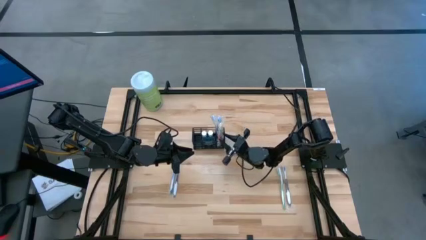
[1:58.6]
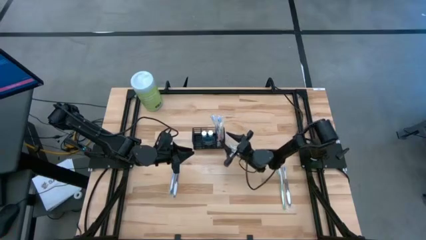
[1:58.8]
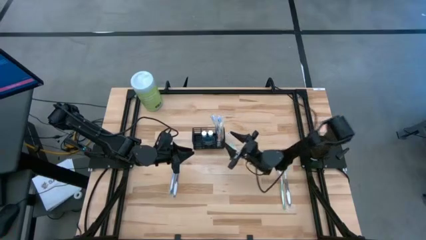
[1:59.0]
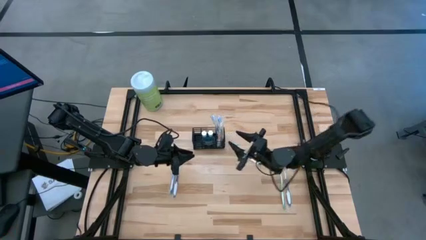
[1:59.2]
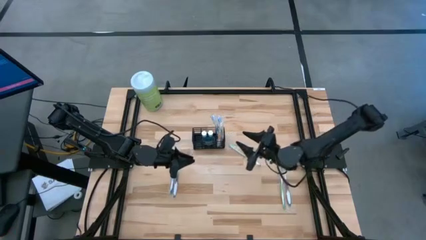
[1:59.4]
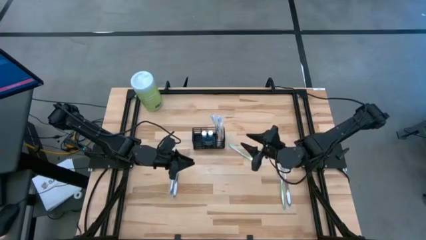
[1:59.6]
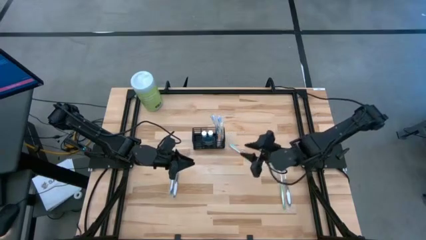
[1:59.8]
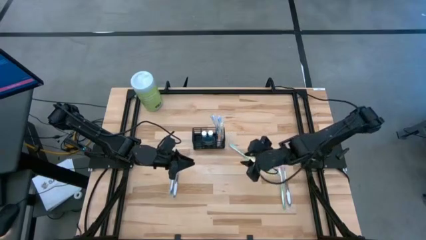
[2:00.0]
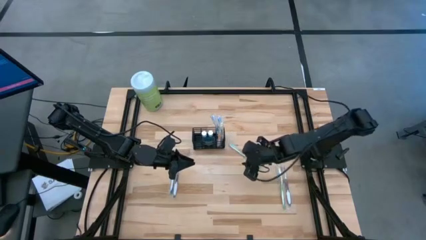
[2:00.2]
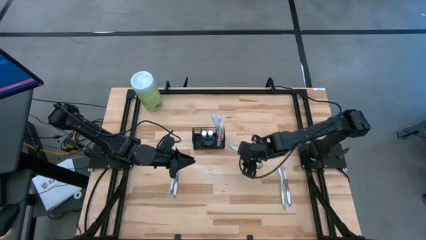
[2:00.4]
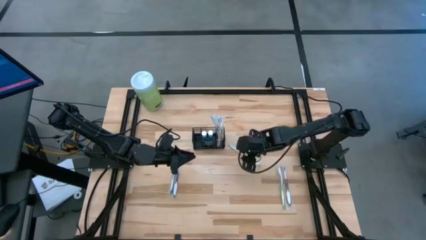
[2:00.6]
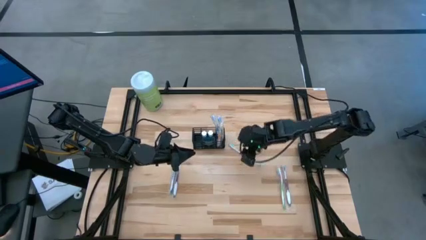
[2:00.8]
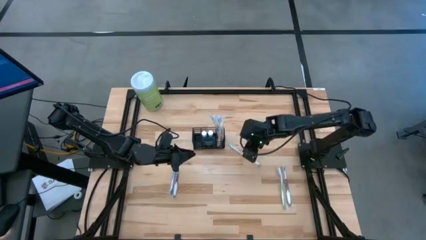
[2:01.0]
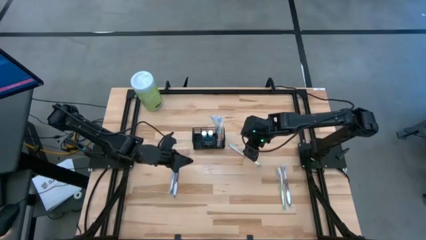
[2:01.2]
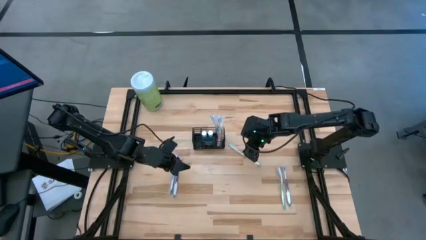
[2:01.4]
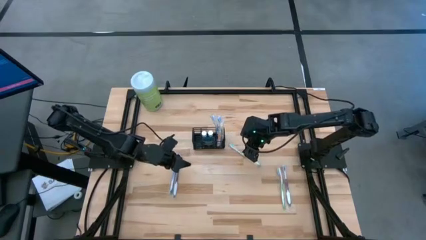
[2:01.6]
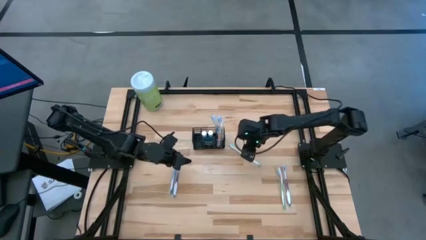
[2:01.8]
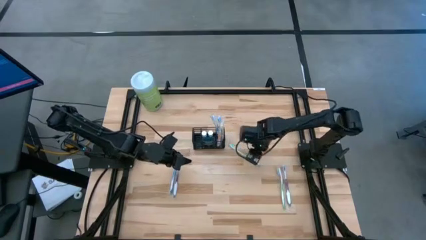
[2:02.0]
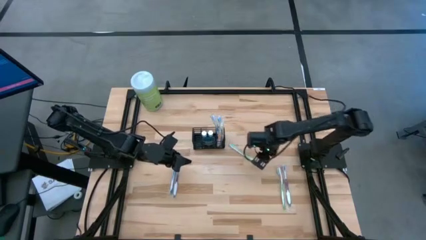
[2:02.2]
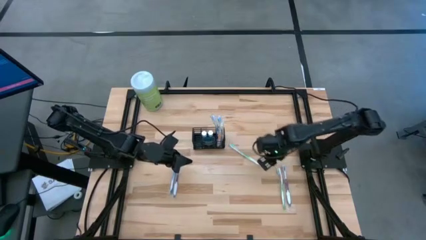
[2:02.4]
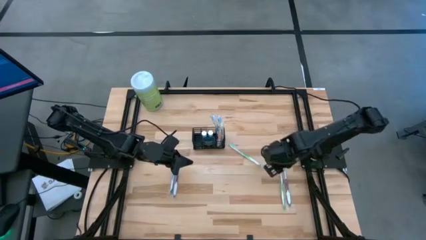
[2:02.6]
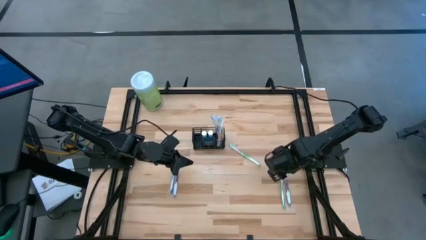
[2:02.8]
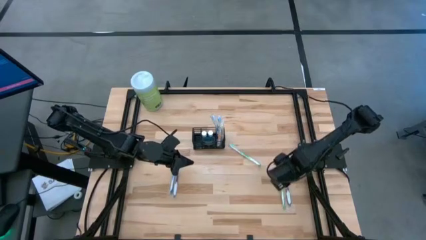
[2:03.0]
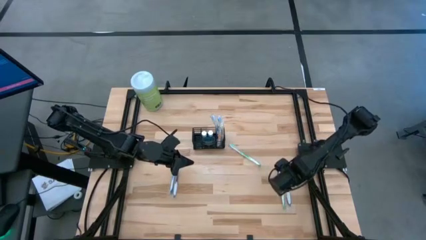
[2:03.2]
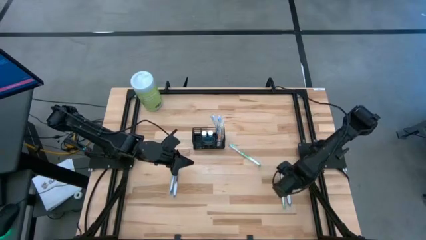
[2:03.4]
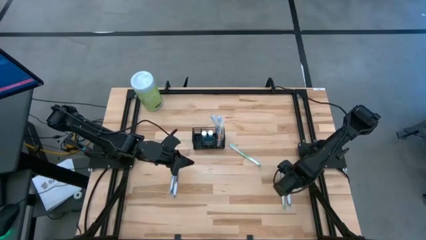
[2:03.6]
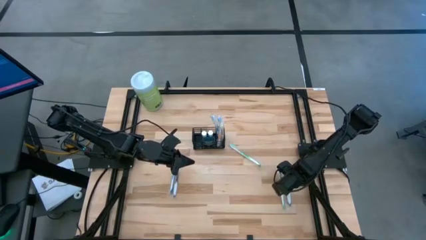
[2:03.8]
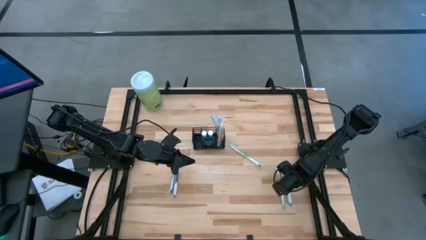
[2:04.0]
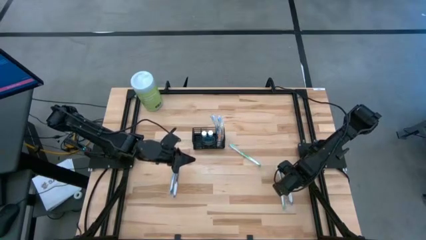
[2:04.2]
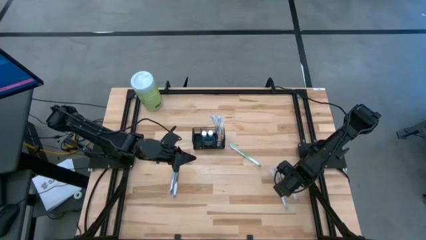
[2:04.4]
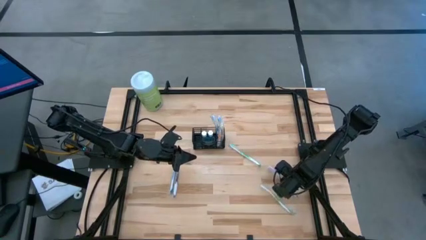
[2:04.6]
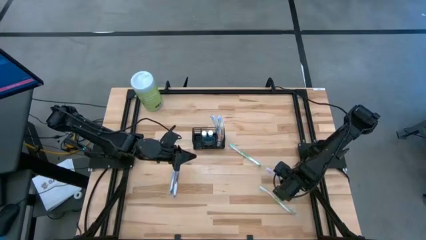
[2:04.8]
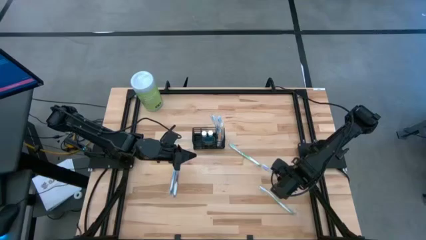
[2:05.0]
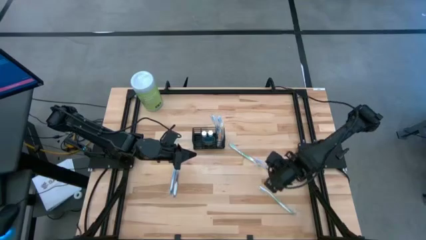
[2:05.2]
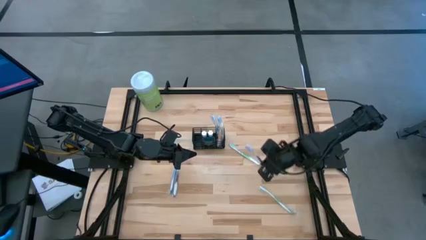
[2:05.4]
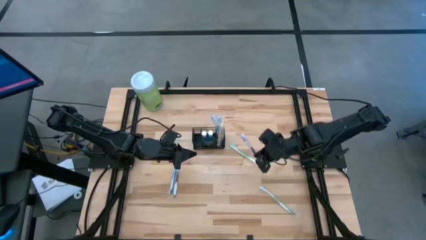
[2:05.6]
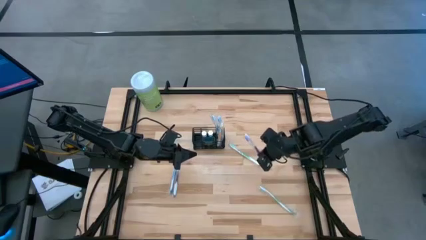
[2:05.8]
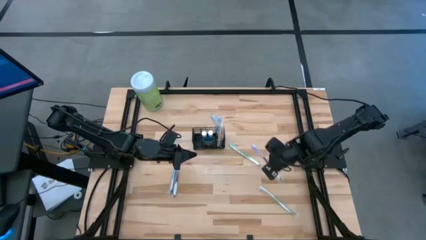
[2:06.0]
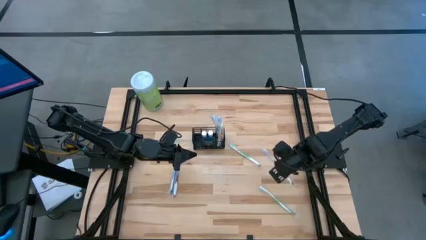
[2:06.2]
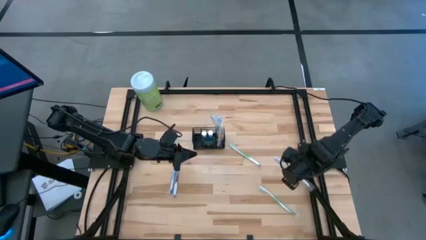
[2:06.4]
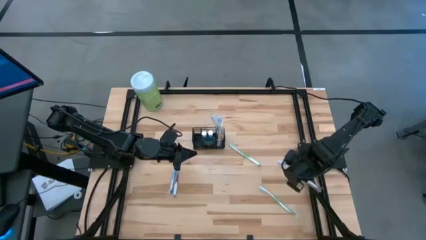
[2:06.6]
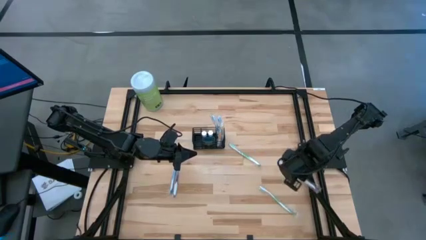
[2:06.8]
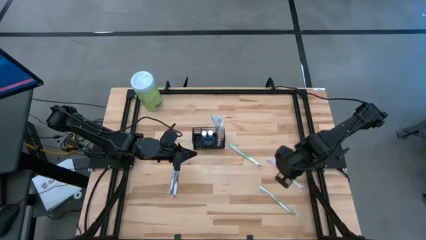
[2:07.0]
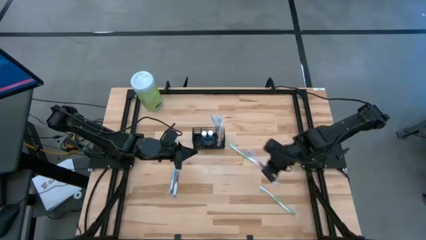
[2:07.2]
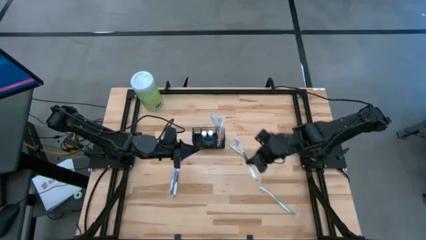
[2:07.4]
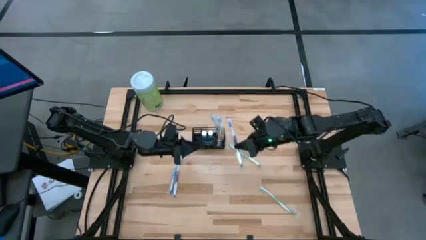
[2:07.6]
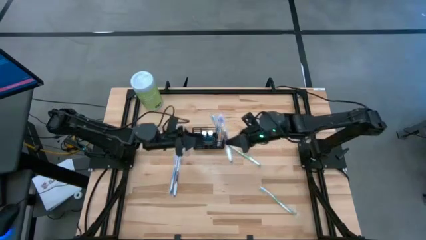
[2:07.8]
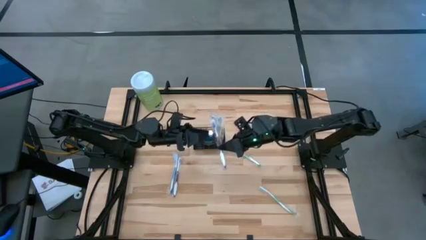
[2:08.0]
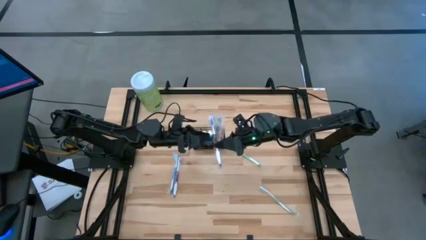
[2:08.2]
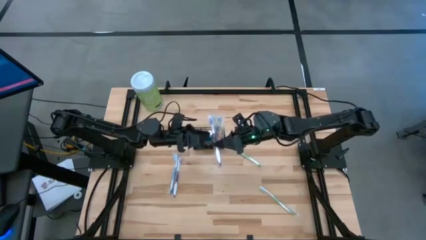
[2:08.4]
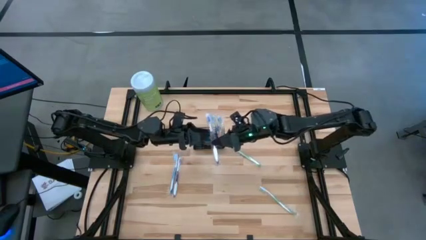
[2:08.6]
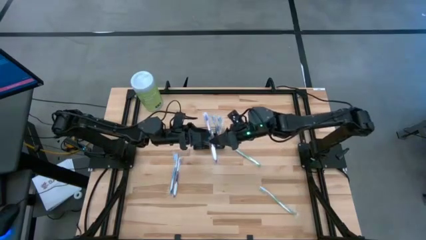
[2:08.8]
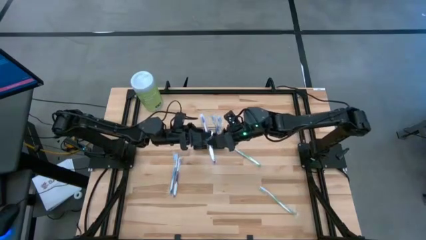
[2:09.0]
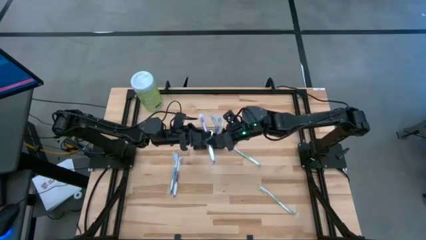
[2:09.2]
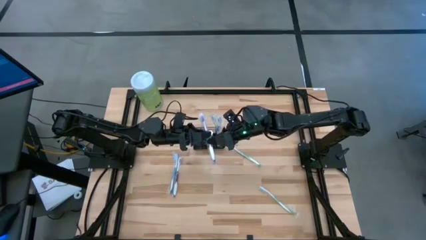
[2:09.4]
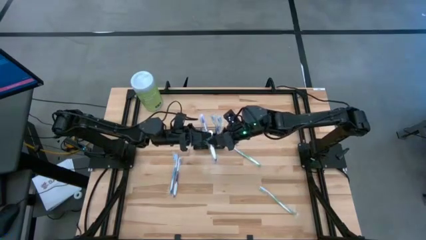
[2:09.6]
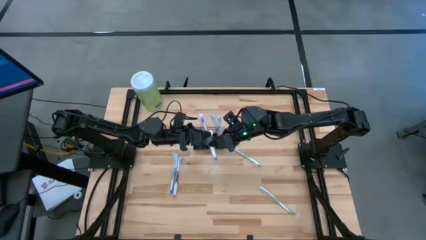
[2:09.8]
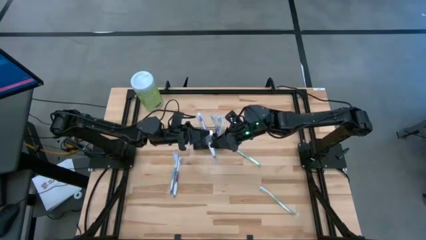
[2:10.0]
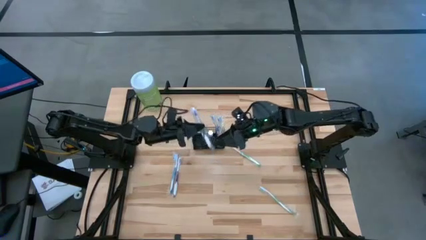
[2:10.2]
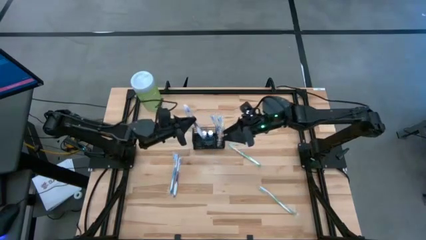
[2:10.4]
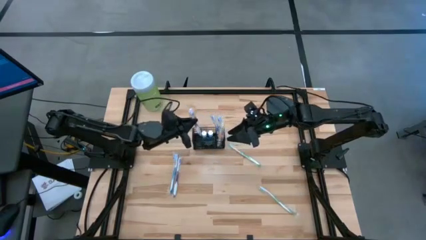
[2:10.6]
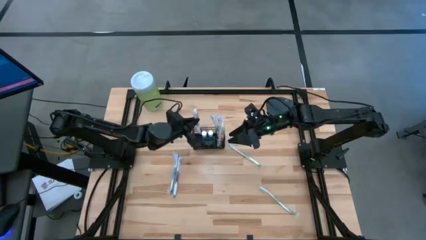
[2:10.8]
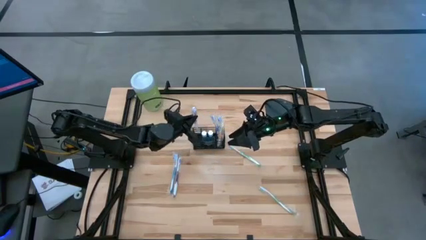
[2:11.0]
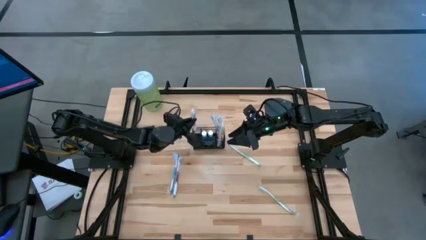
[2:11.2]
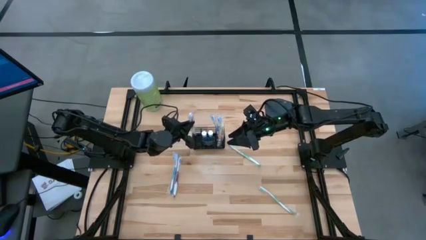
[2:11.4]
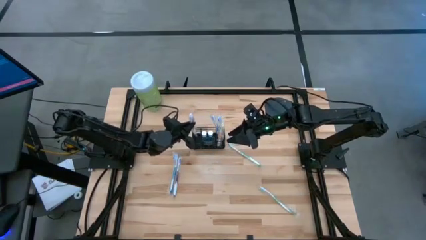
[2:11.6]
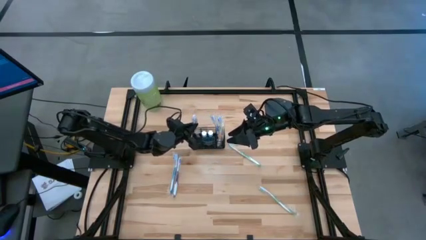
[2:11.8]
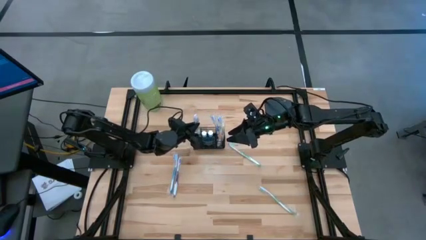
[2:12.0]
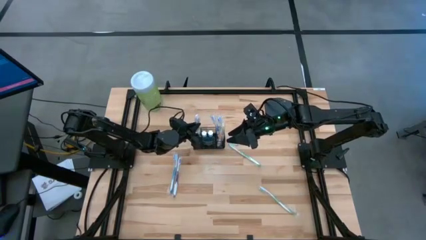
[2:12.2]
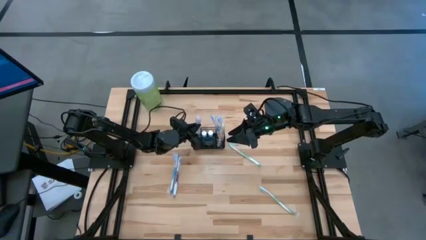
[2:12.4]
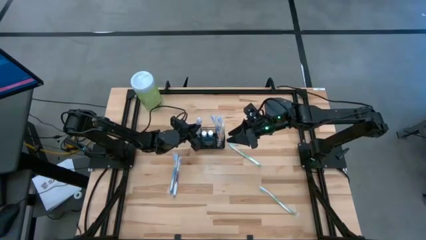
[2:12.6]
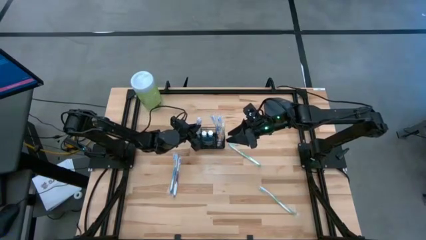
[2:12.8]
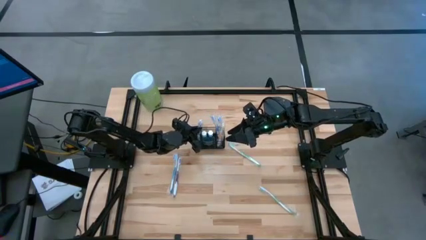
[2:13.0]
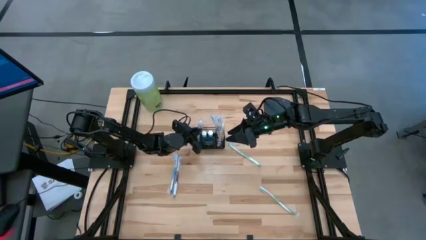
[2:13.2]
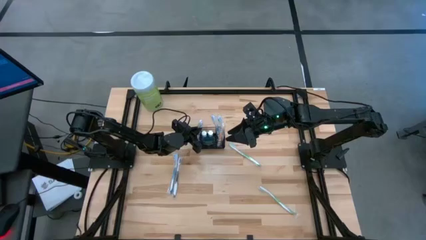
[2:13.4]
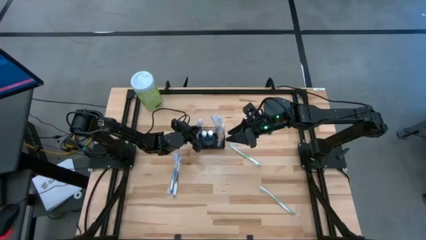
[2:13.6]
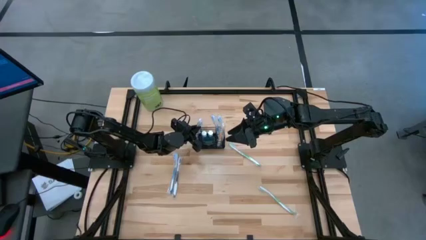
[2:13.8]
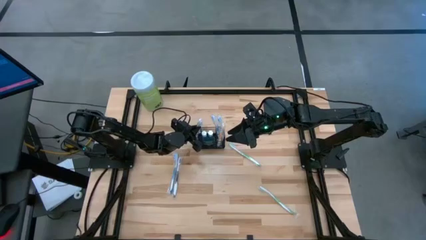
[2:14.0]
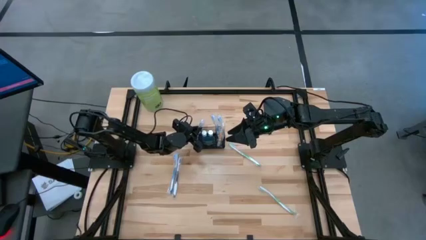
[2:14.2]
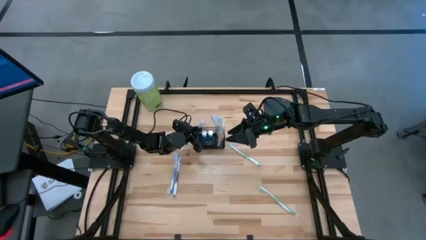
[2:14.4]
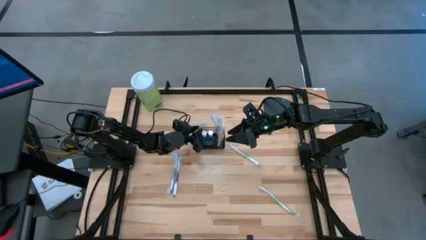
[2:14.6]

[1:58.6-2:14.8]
Task: Pick & Place toothbrushing station
Put the right purple toothbrush into the black mesh organizer
